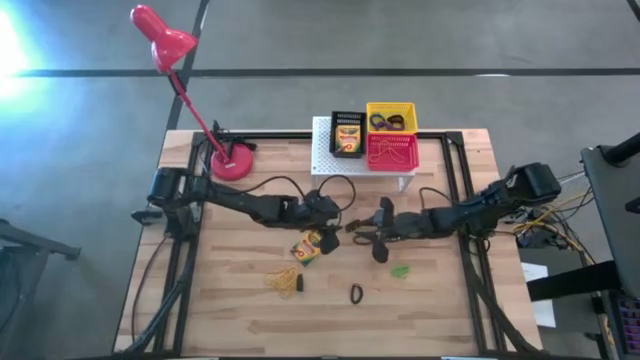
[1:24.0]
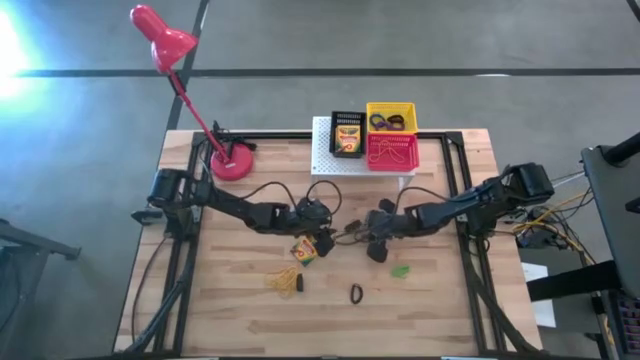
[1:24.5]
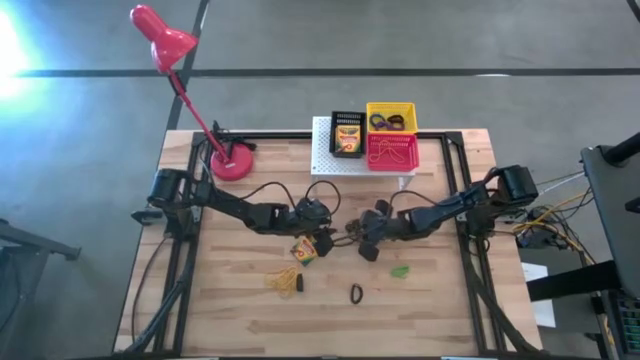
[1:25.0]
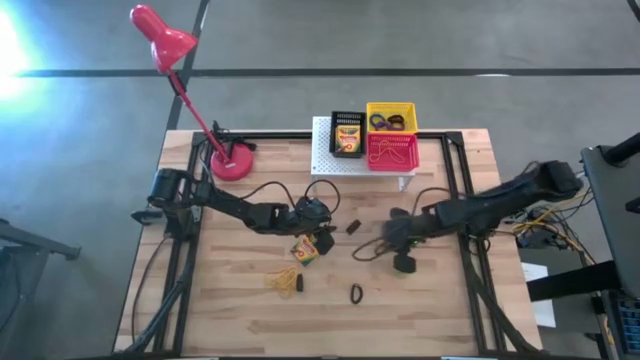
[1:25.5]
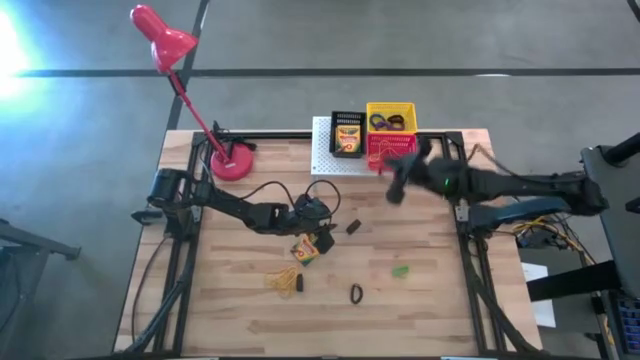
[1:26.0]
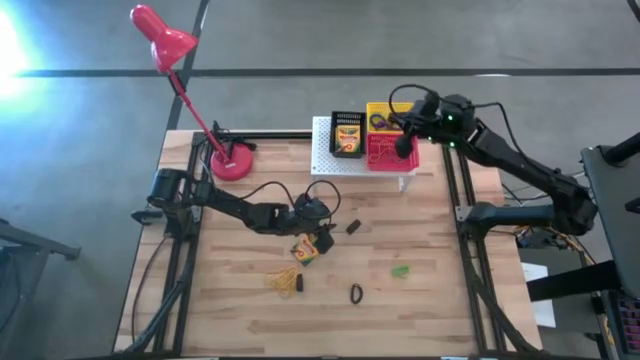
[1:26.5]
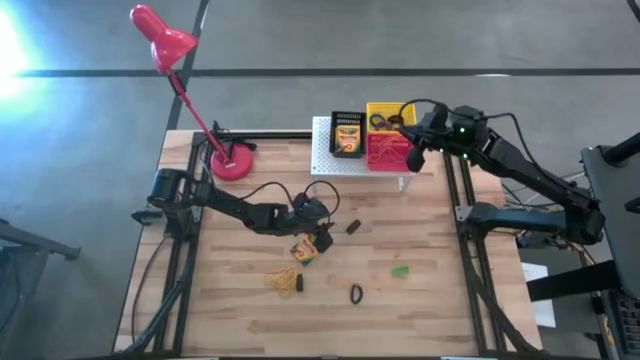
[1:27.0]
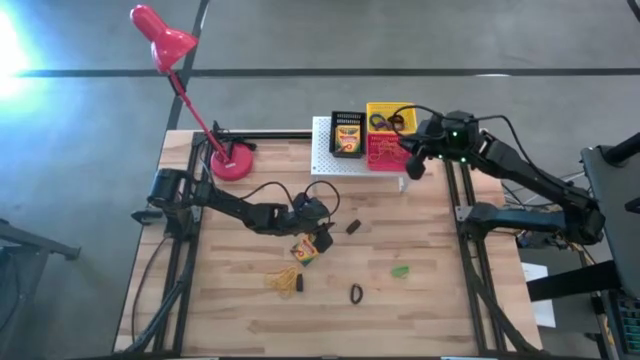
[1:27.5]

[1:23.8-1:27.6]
Task: Pick & Place Office Desk Supplies
Put the yellow rubber band into the red basket on the shelf

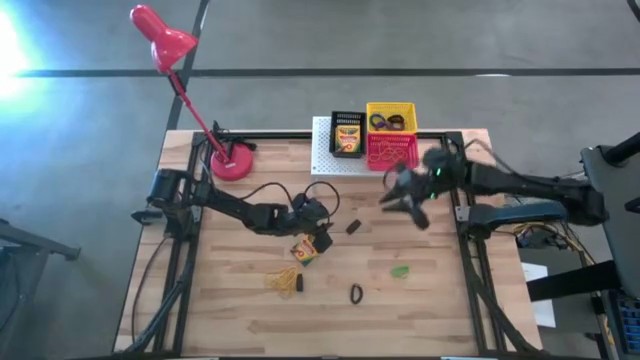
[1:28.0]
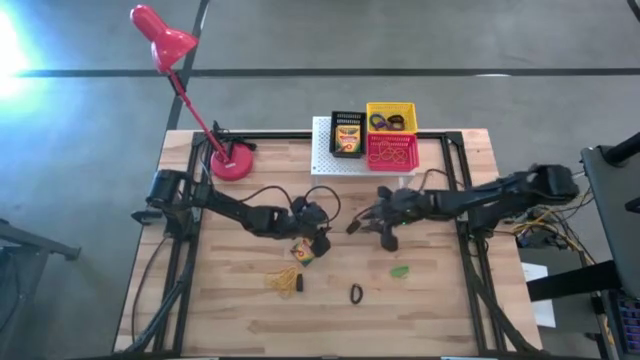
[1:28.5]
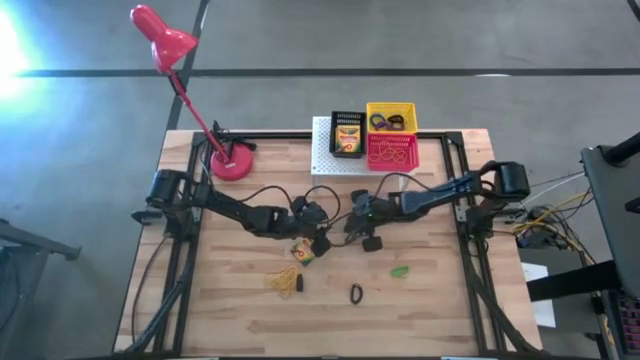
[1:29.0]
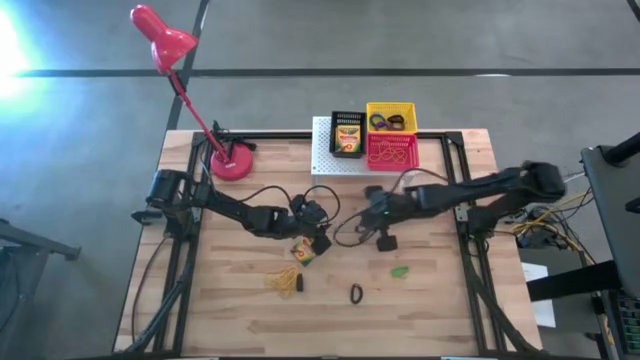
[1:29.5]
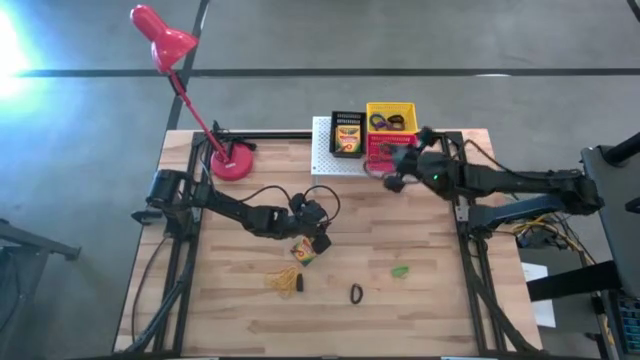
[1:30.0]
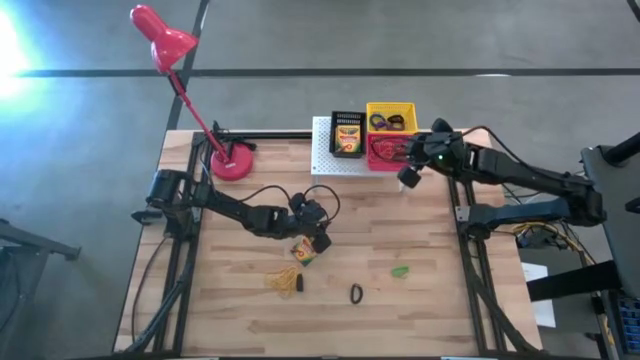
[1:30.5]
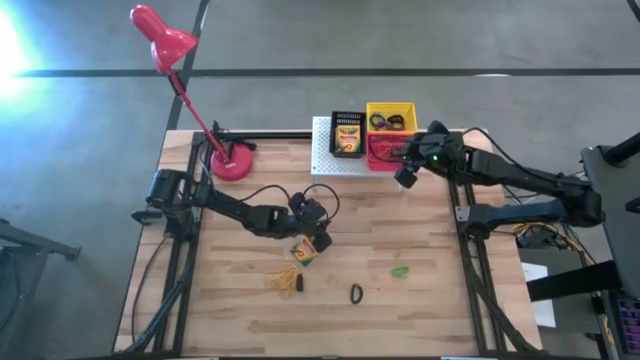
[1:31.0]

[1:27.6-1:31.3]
Put the black rubber band into the red basket on the shelf

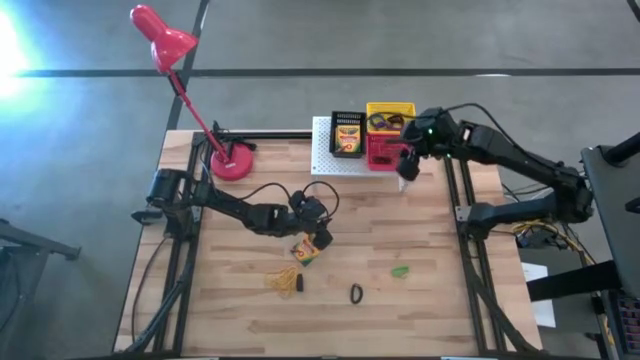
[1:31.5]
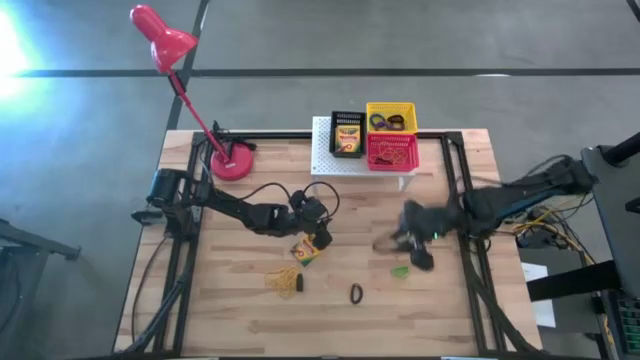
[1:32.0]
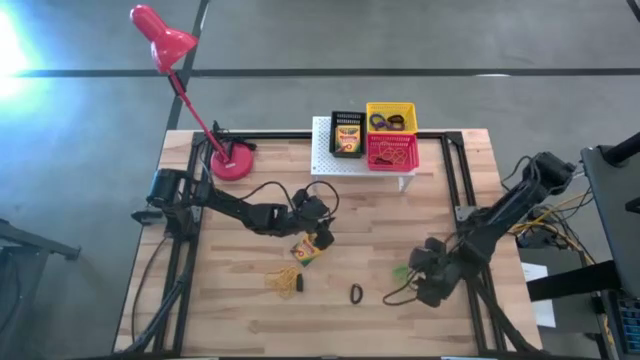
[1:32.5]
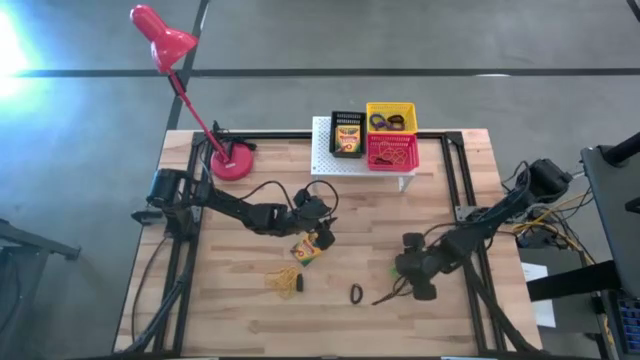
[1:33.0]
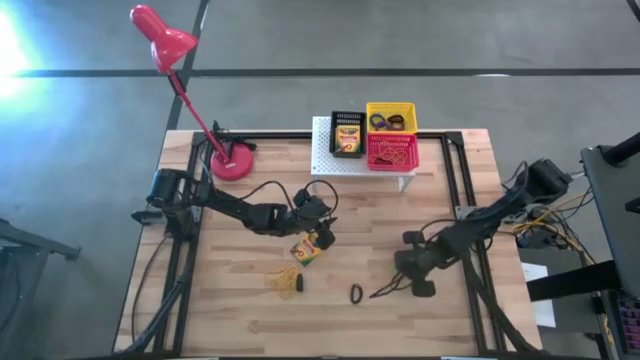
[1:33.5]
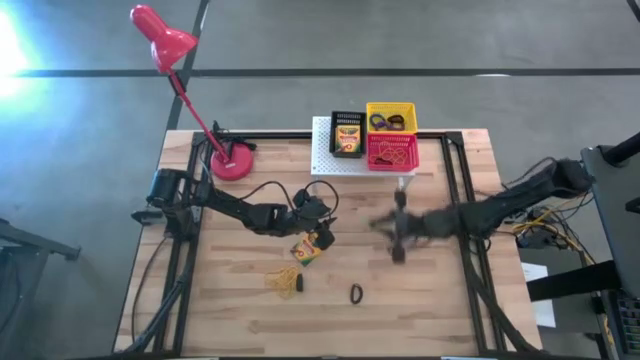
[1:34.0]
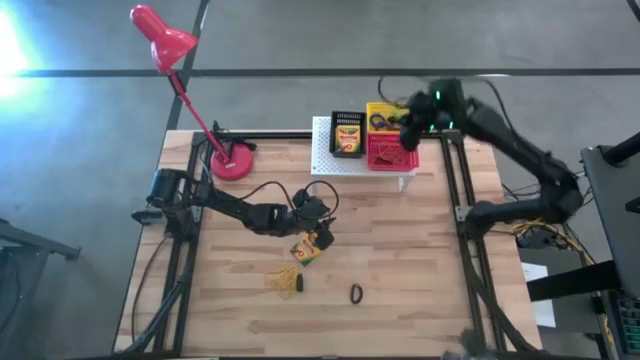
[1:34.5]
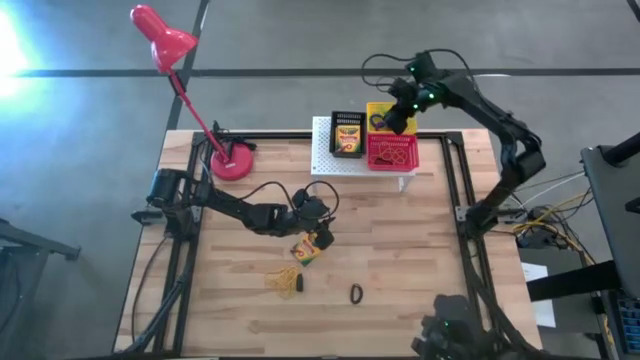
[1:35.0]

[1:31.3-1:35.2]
Put the green spring keychain into the yellow basket on the shelf

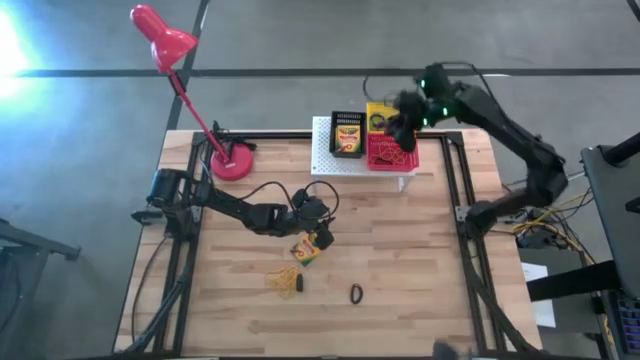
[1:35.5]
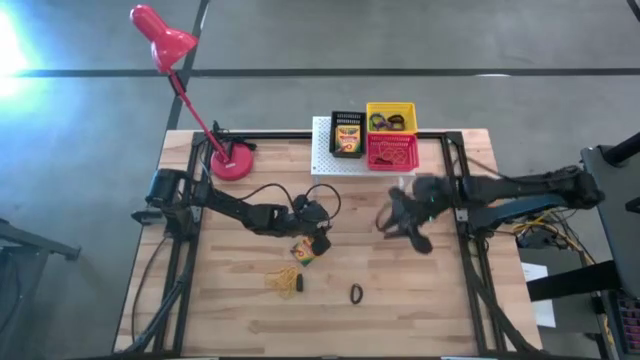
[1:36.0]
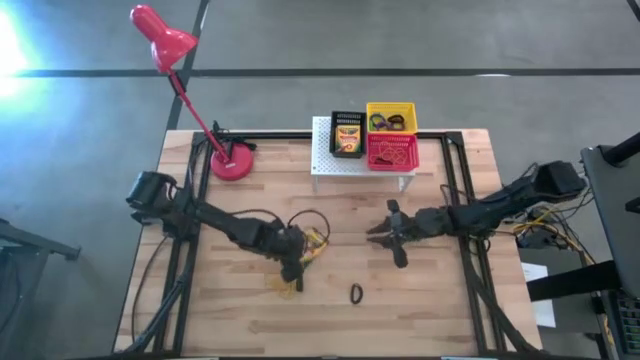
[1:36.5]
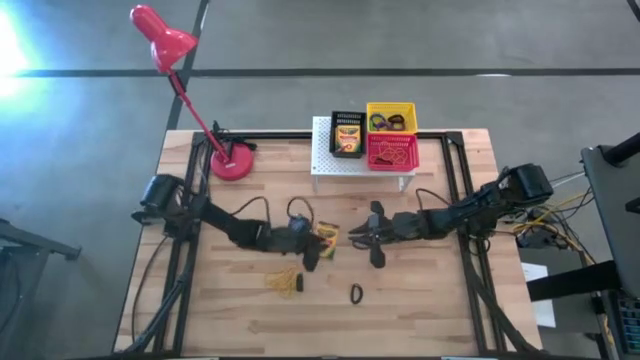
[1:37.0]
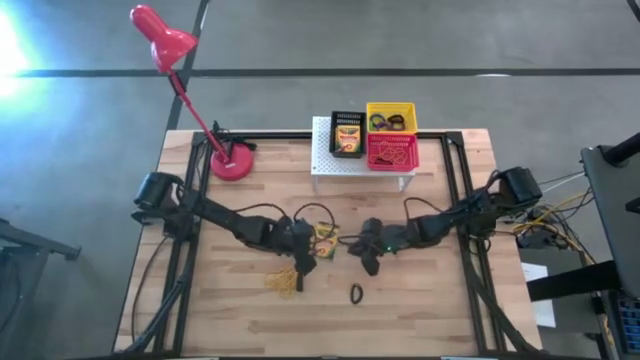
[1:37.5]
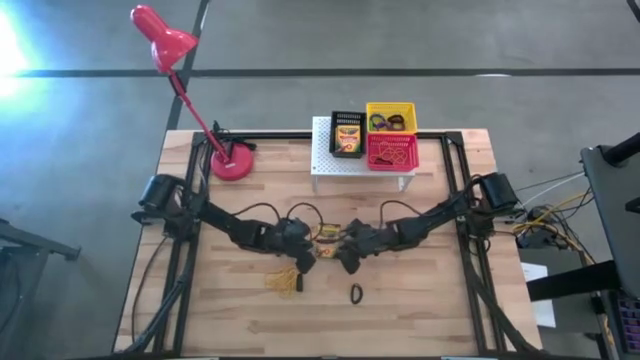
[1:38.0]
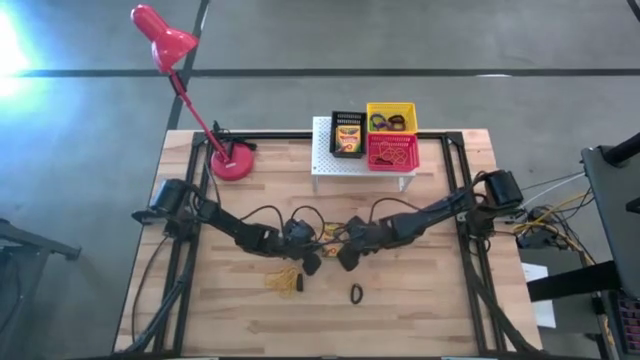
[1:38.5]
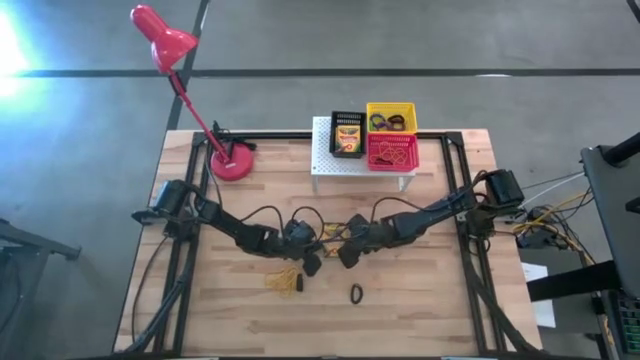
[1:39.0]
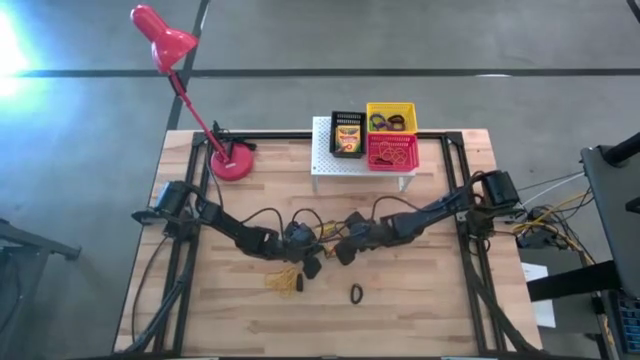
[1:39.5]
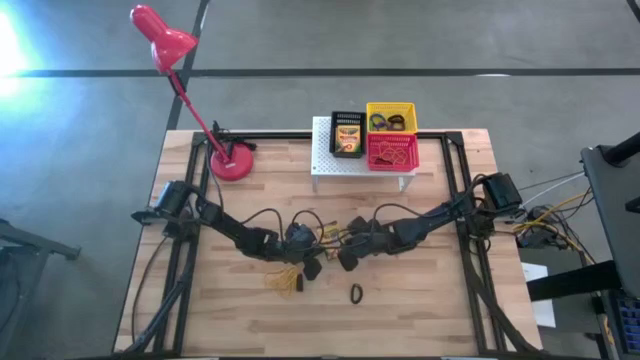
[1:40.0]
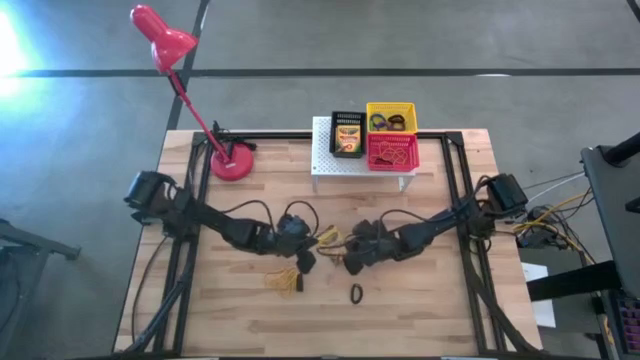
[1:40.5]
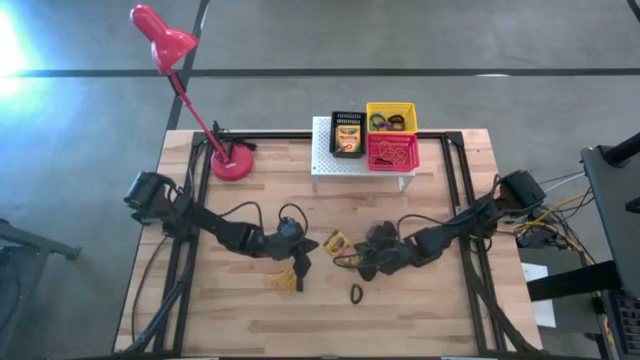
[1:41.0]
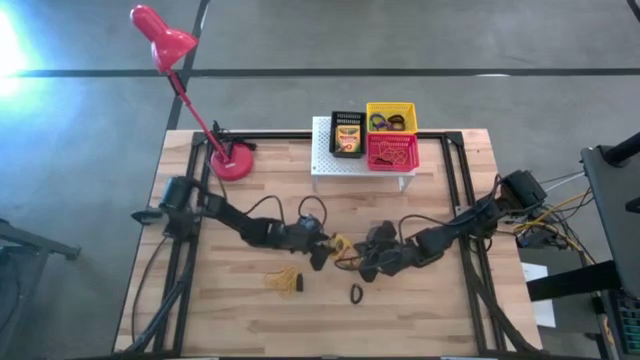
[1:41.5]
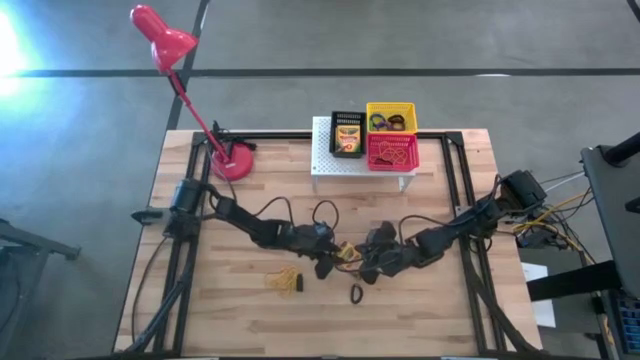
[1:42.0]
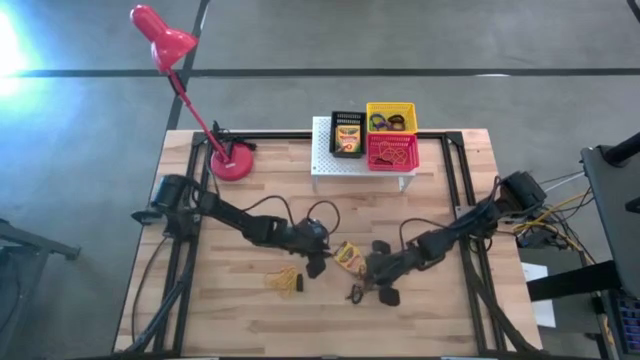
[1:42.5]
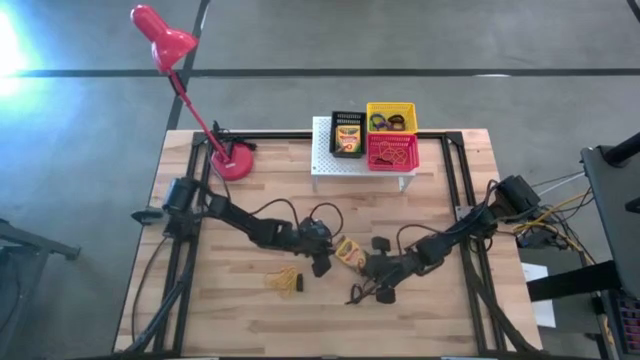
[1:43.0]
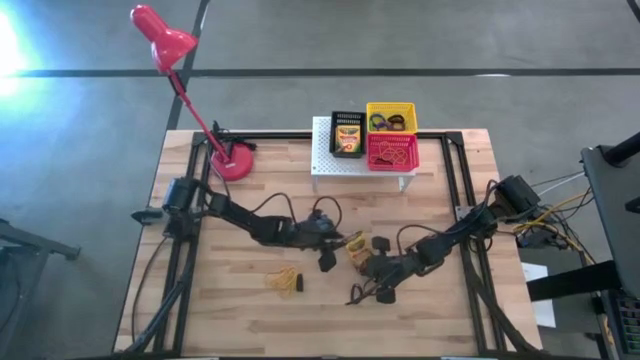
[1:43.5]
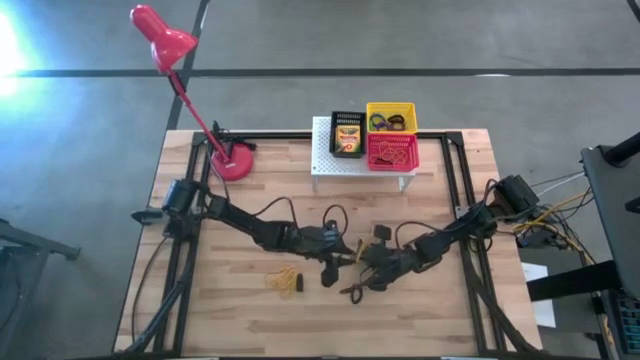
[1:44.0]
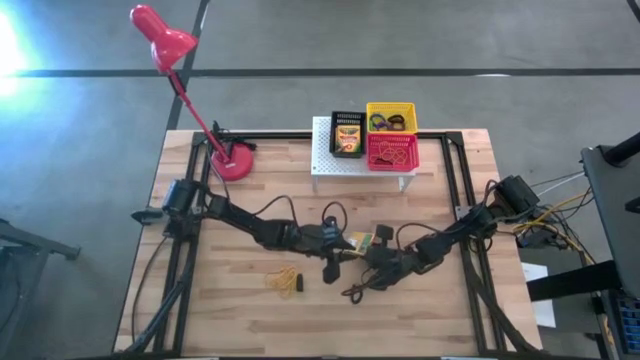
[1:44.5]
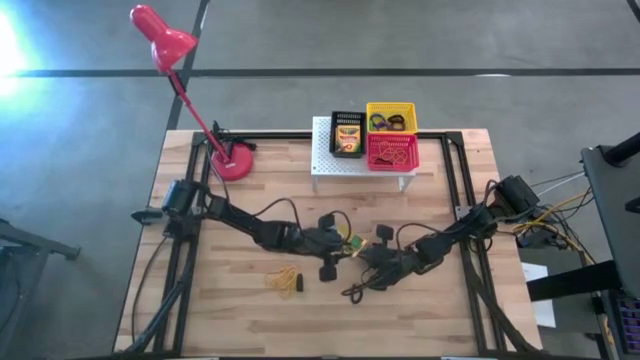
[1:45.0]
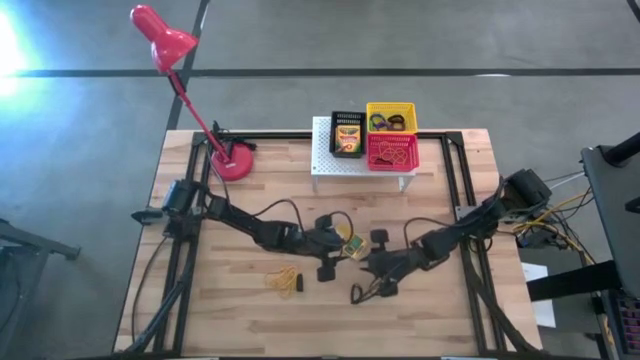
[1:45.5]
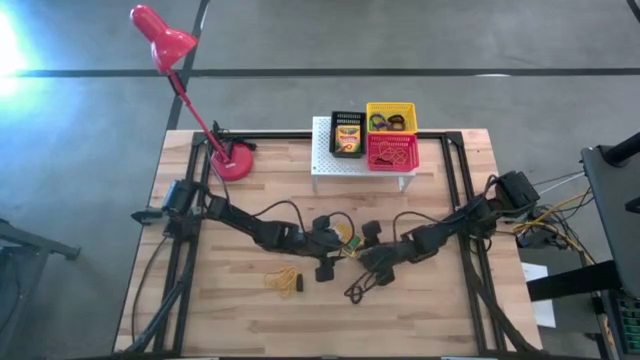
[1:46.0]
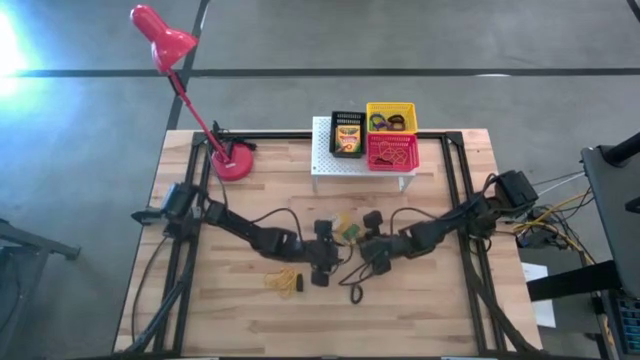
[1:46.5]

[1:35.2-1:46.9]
Put the crayon box into the black basket on the shelf
